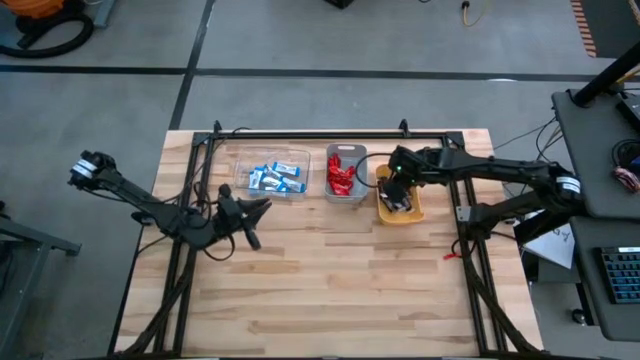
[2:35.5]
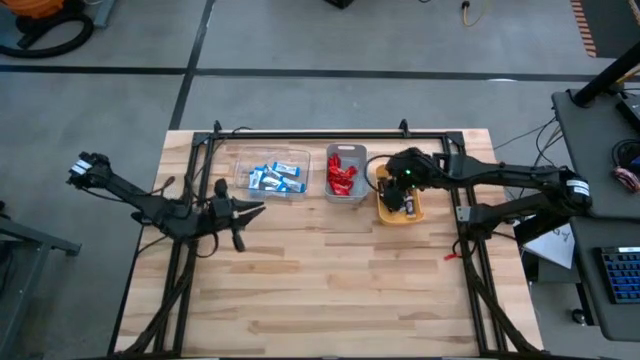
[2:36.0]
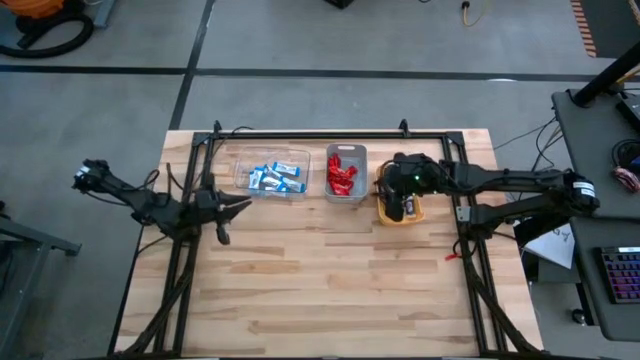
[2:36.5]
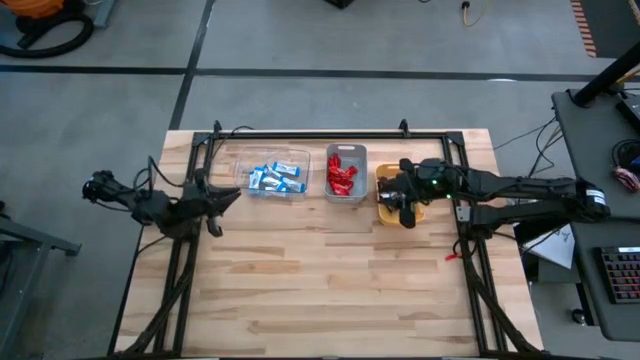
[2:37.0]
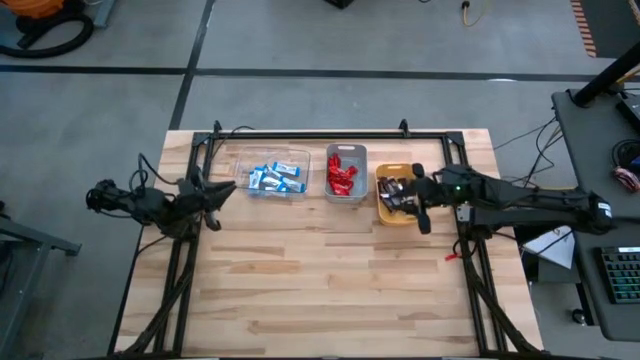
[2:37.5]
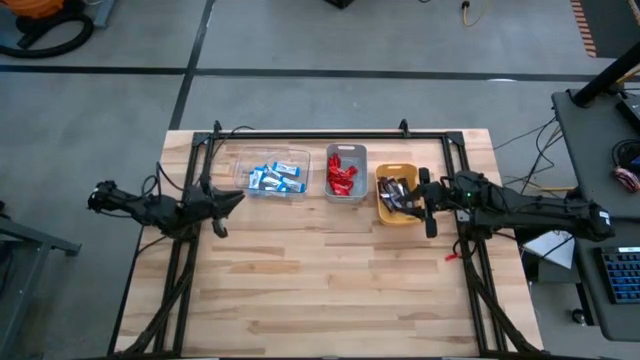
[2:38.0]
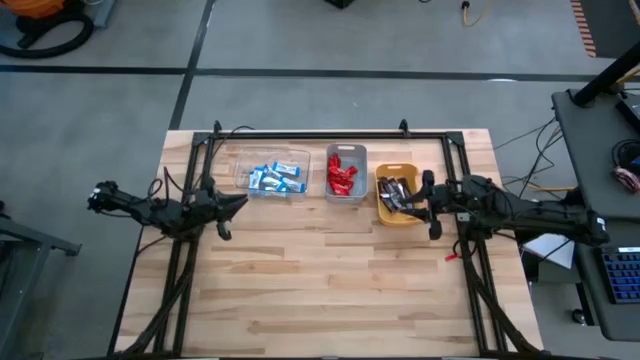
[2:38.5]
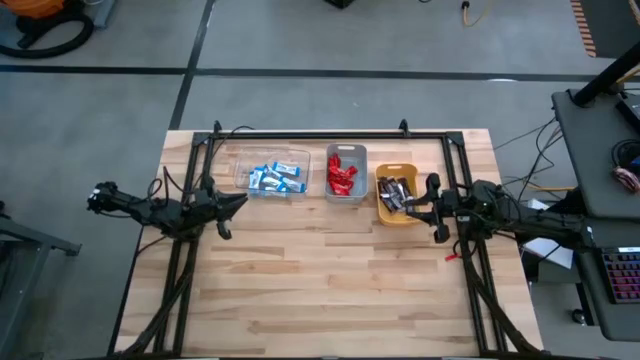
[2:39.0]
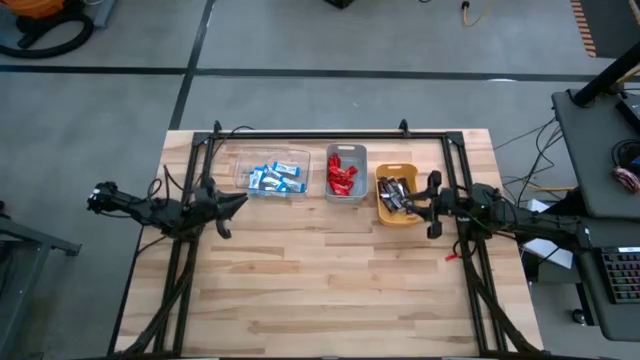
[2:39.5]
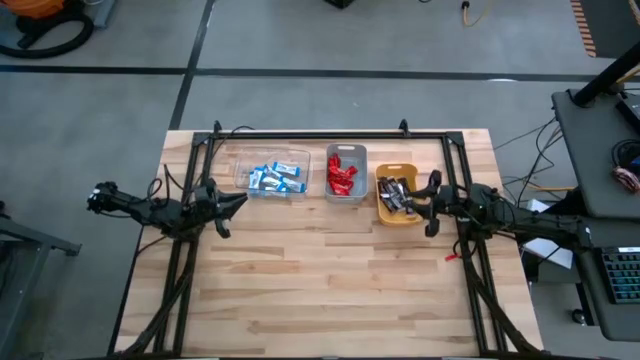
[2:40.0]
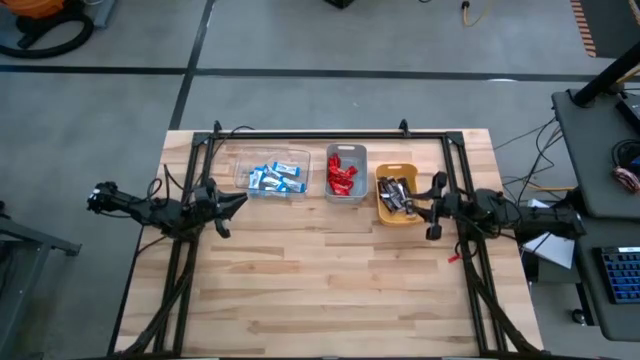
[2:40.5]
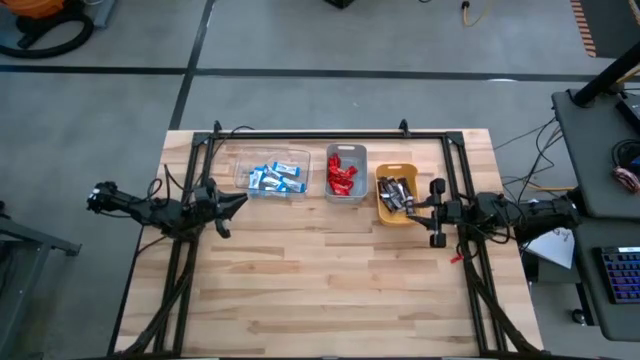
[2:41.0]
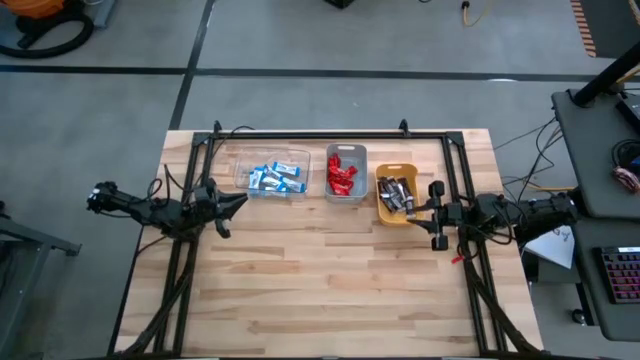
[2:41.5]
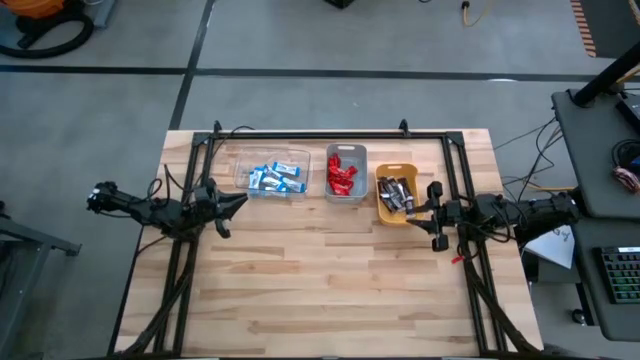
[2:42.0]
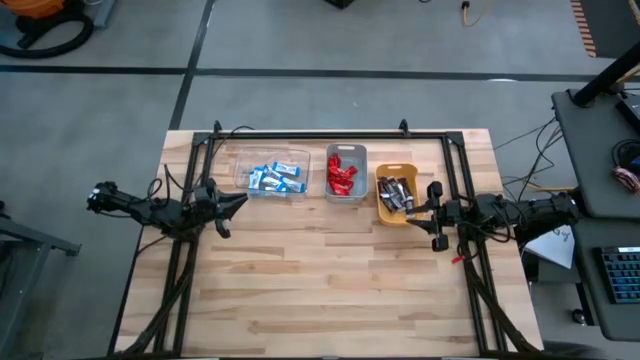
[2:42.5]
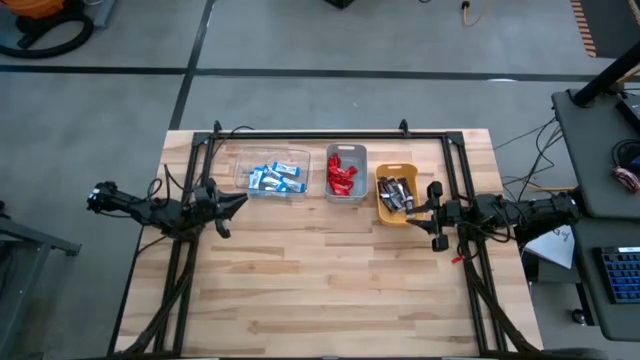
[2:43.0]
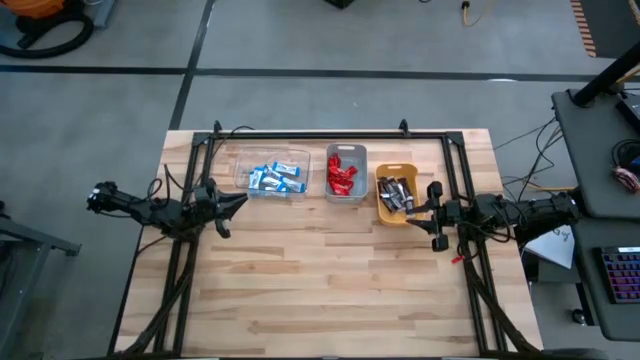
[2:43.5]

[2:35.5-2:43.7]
Task: Organize candy in baskets
Return to Home Position

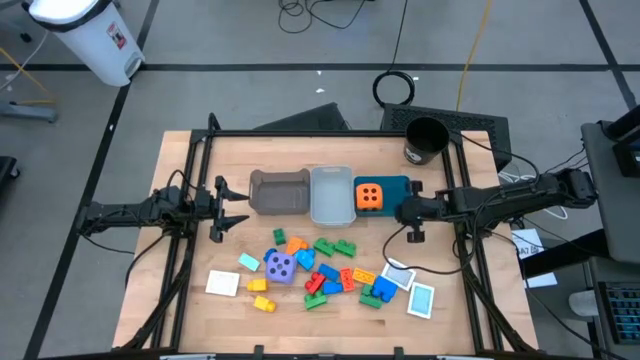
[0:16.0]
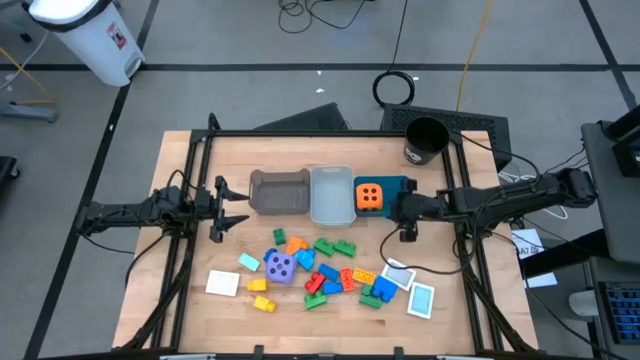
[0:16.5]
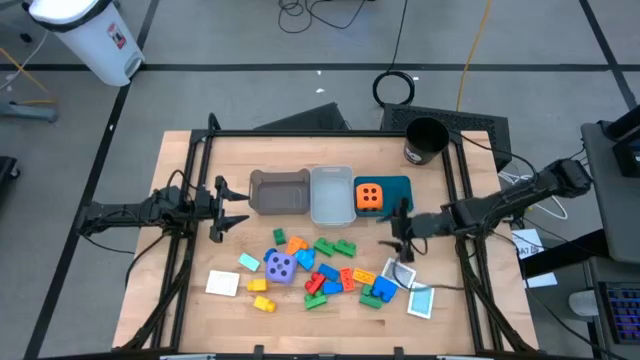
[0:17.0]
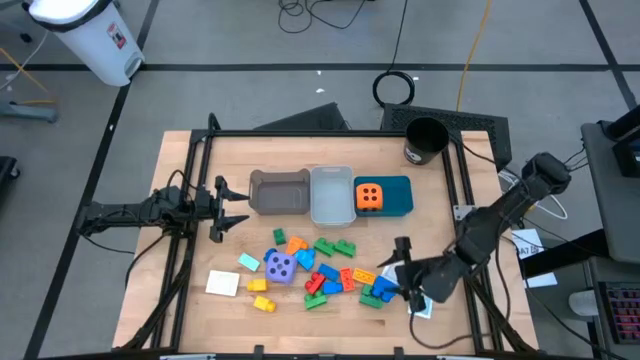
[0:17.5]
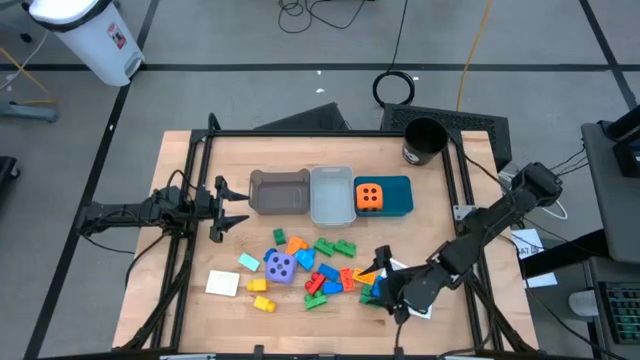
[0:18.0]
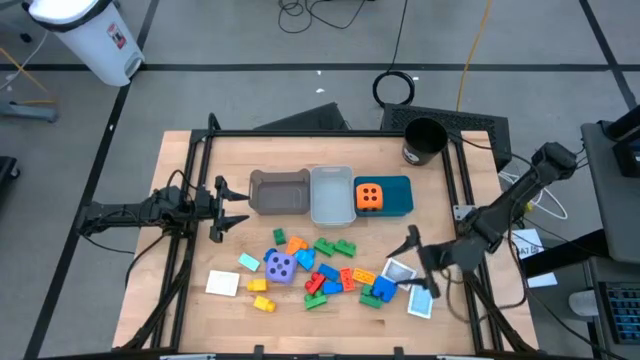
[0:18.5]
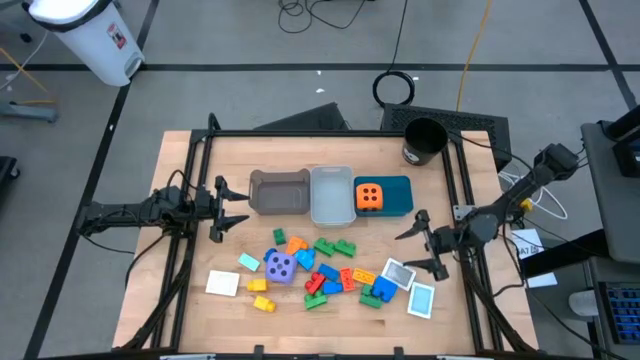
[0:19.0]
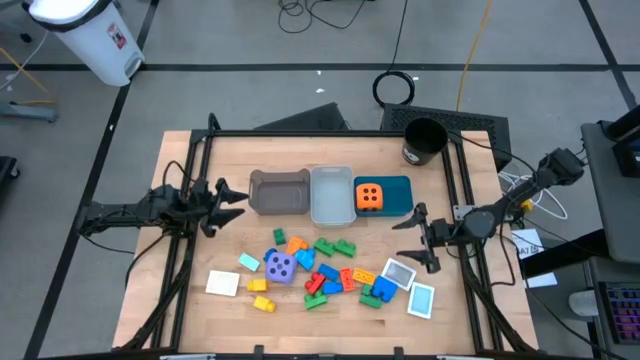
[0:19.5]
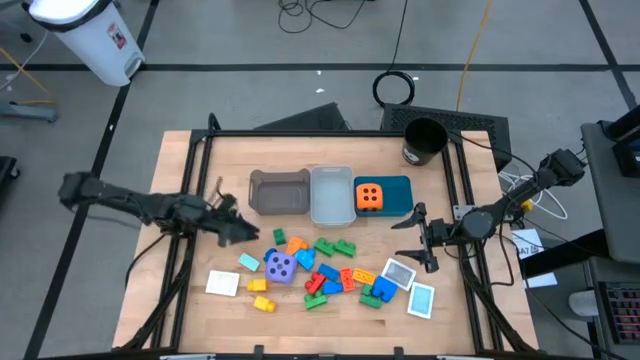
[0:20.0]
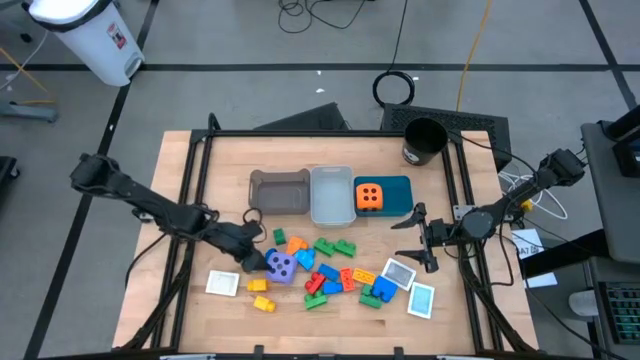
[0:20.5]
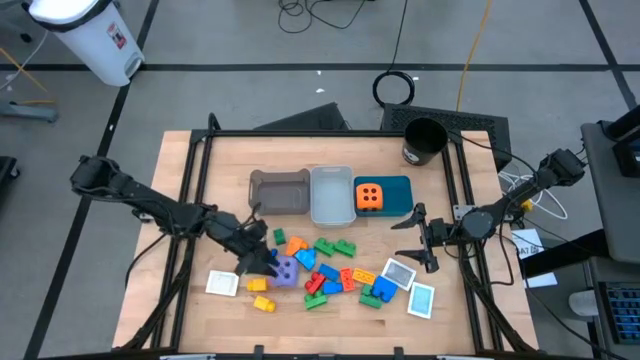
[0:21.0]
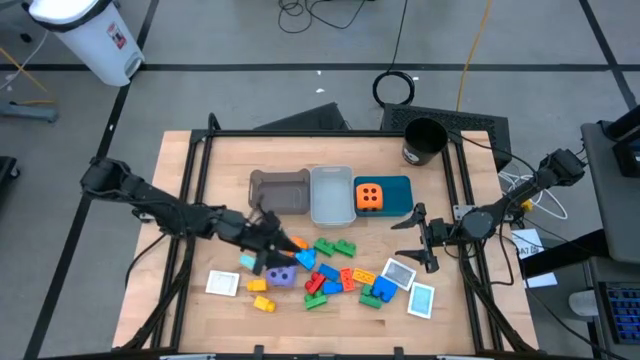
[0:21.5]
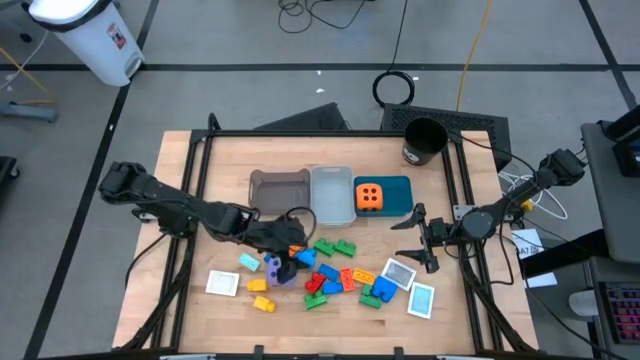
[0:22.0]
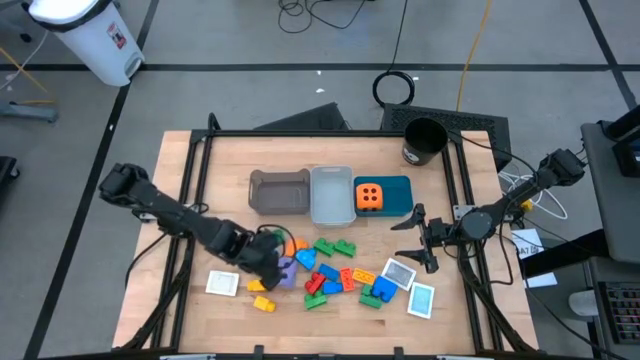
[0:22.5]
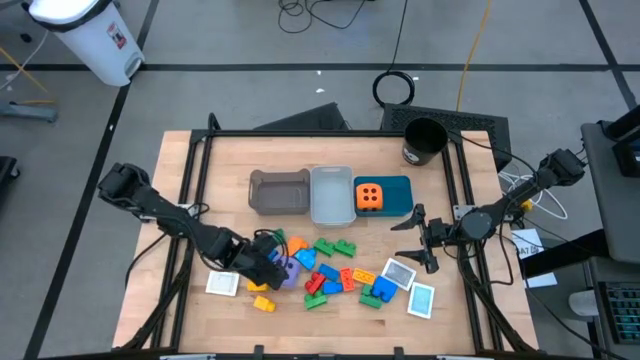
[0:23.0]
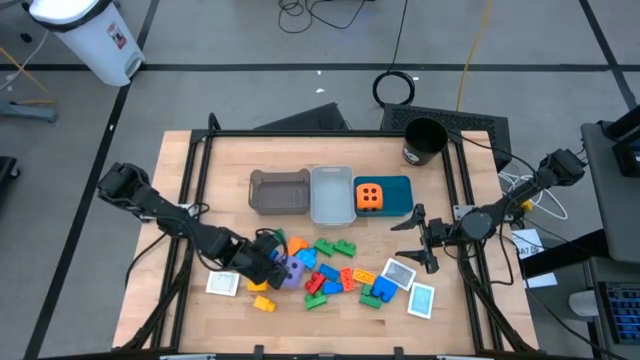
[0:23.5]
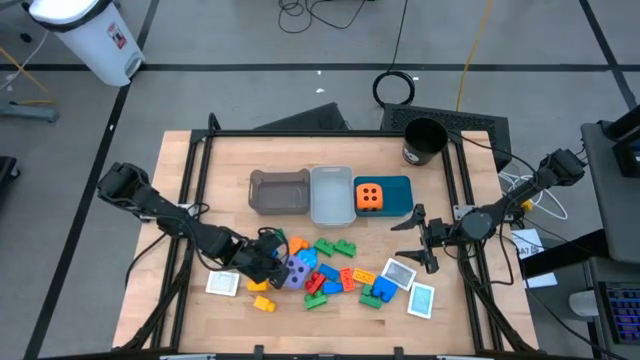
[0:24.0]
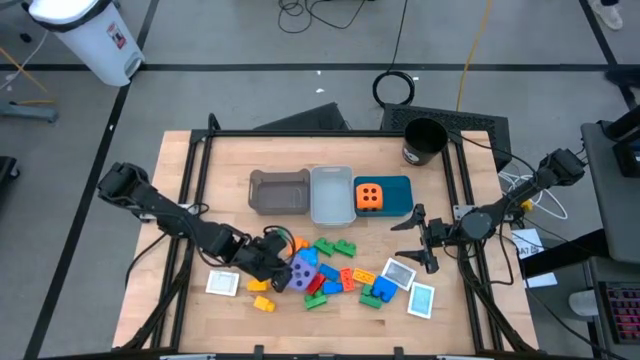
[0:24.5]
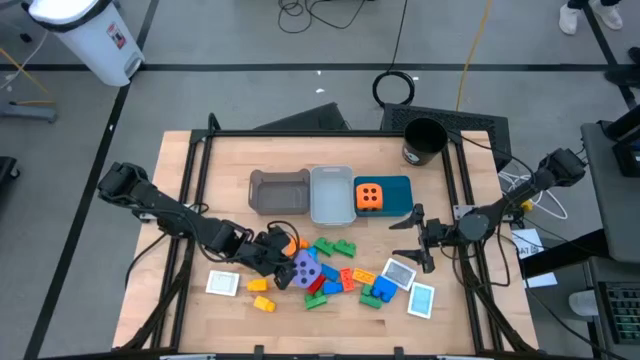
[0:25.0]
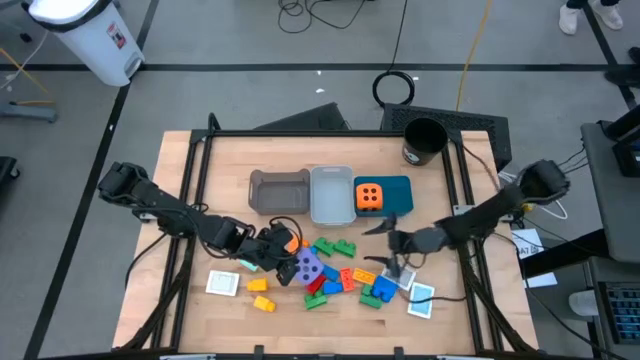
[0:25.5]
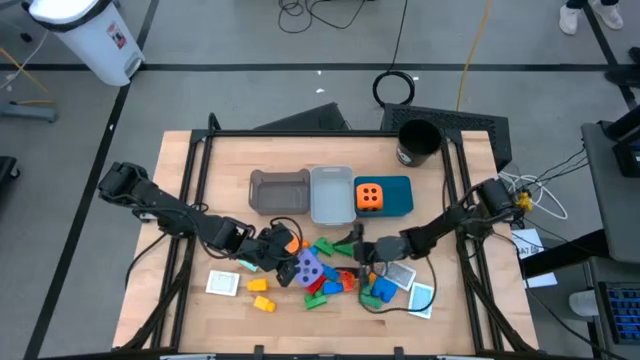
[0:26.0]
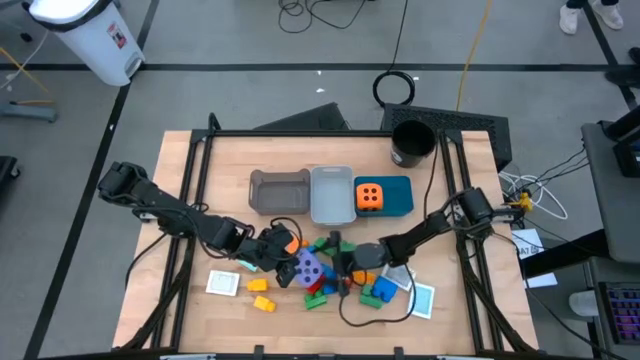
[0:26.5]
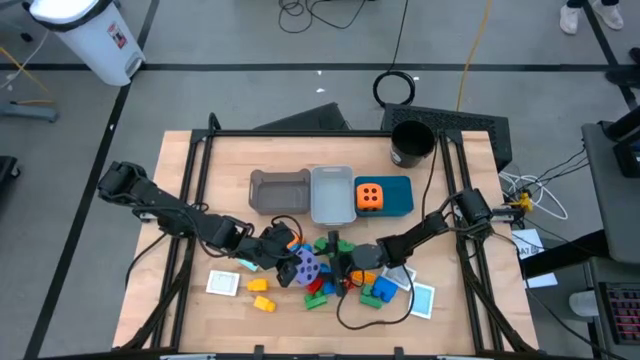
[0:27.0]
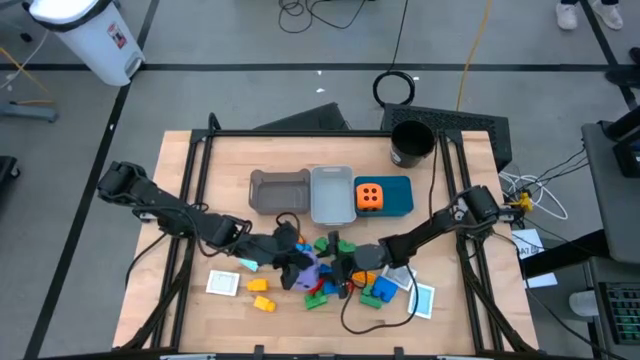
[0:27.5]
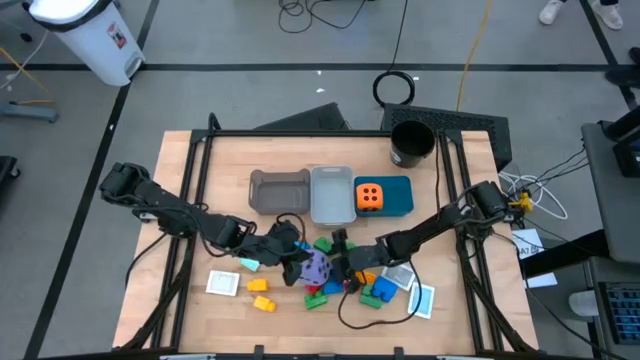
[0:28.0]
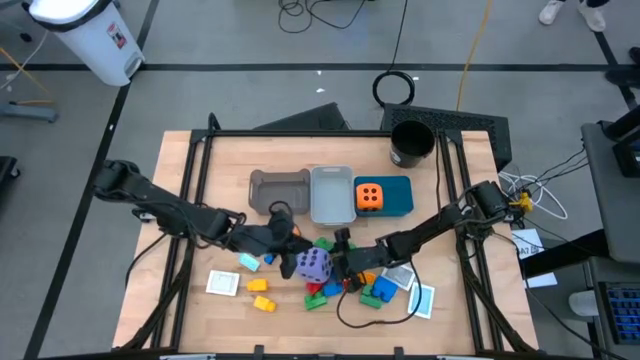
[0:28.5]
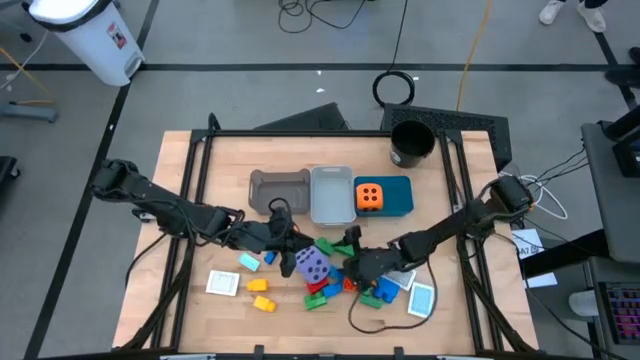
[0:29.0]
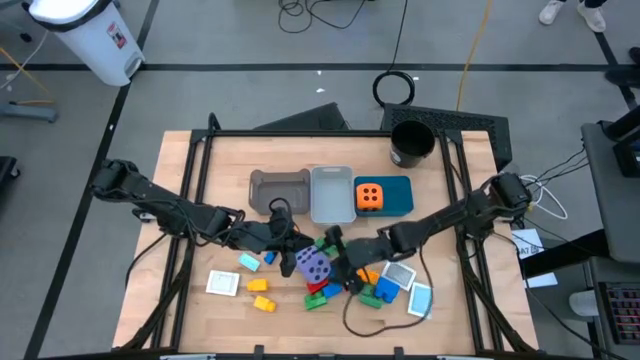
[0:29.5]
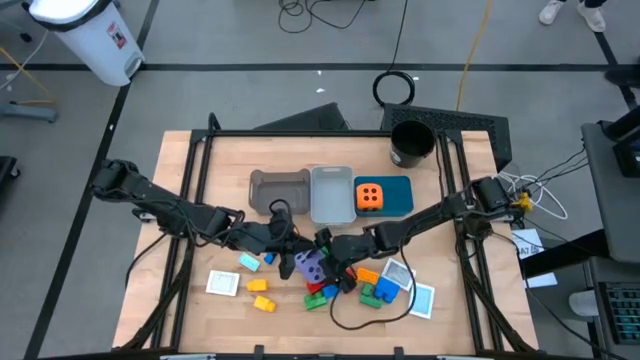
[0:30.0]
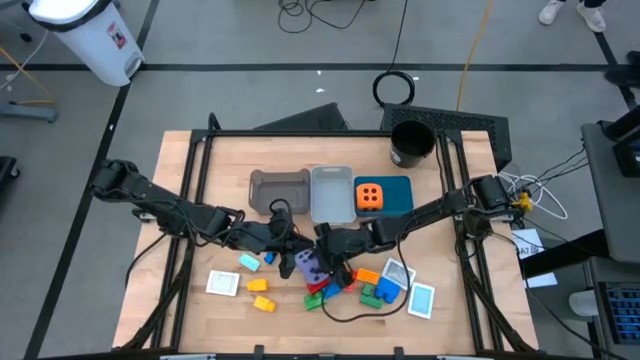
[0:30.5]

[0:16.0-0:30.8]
Task: Pick & Place Toys
Put the purple die into the blue bin
